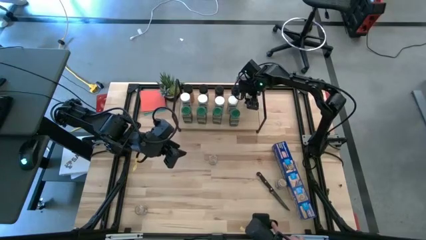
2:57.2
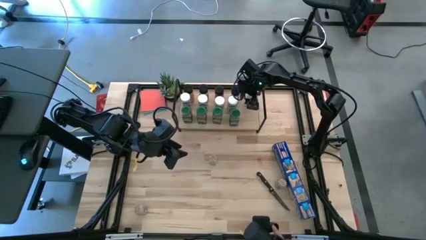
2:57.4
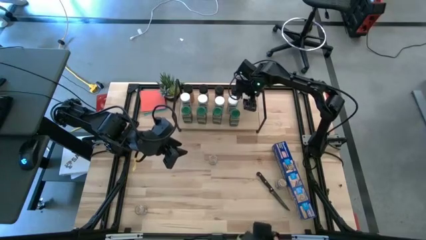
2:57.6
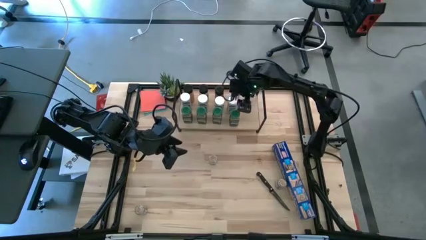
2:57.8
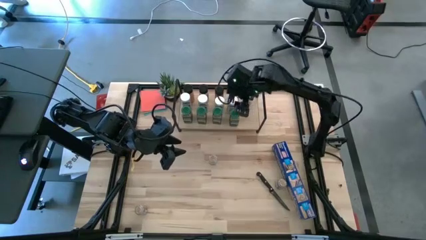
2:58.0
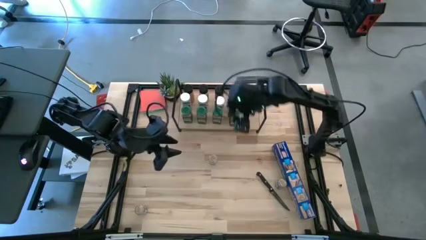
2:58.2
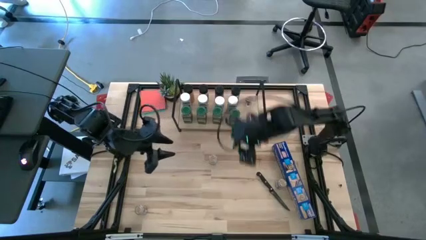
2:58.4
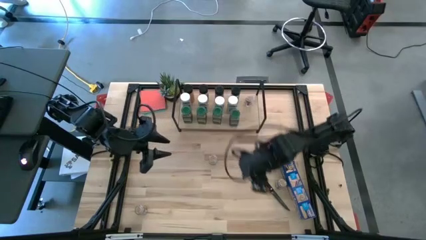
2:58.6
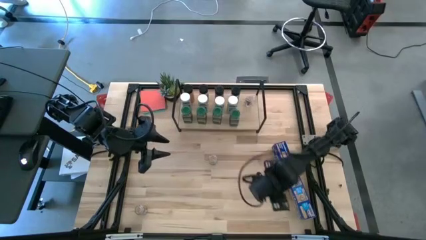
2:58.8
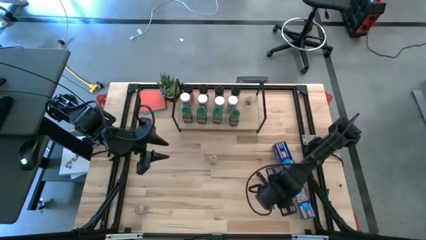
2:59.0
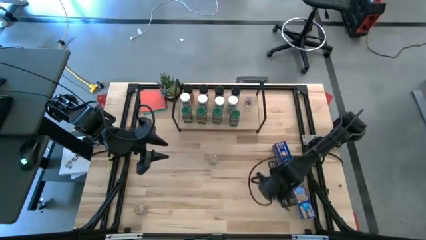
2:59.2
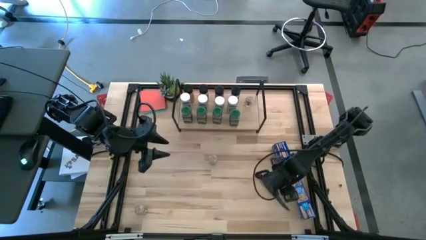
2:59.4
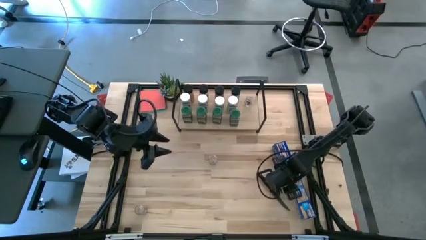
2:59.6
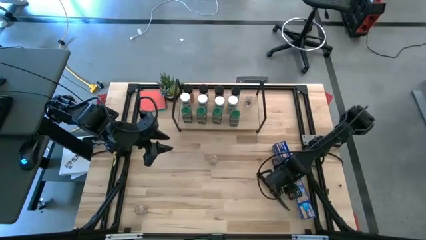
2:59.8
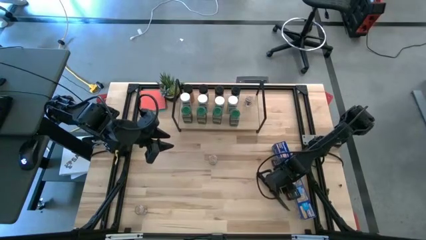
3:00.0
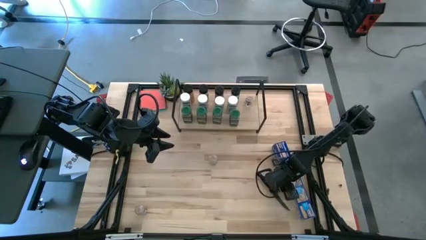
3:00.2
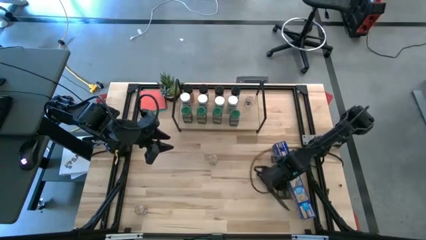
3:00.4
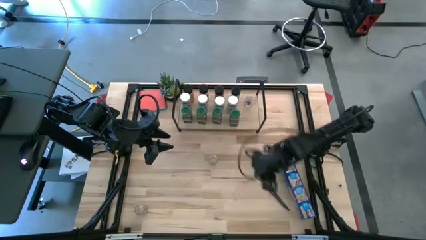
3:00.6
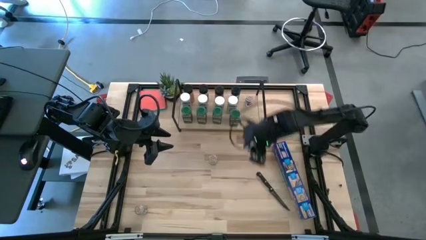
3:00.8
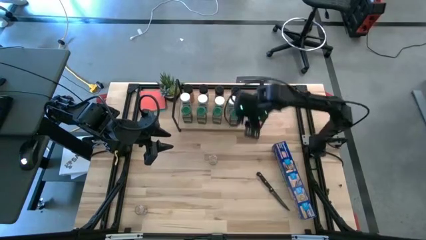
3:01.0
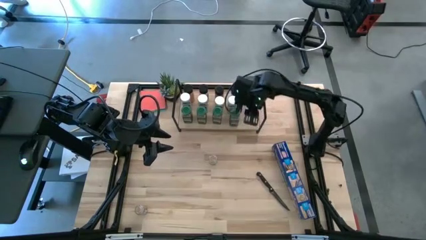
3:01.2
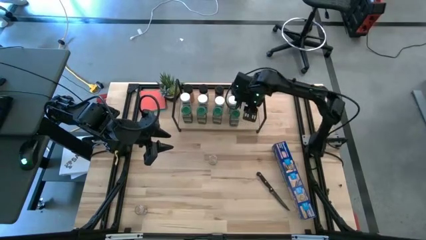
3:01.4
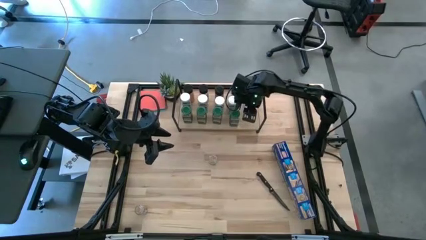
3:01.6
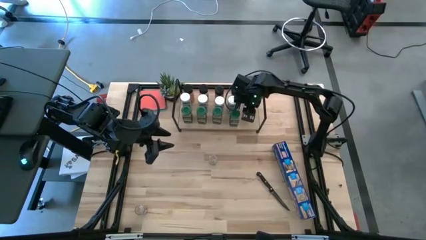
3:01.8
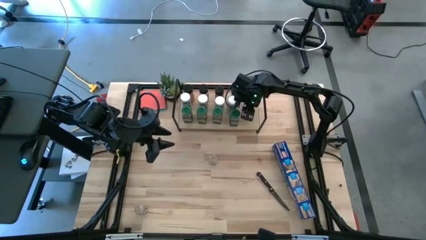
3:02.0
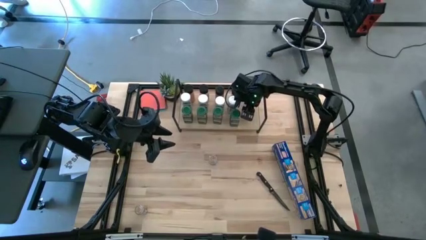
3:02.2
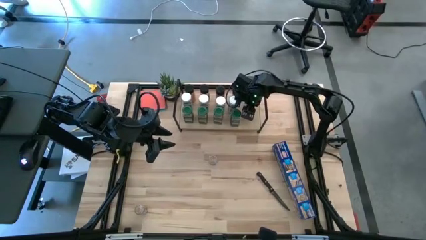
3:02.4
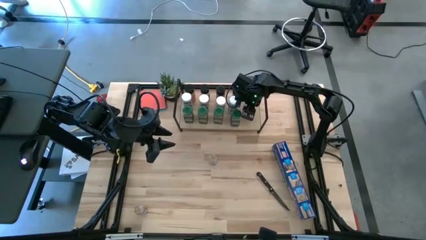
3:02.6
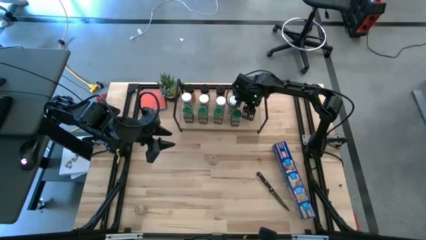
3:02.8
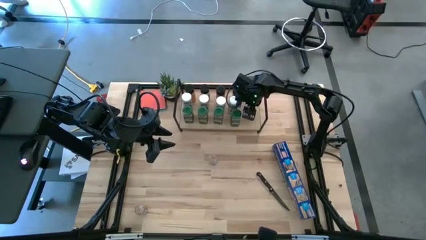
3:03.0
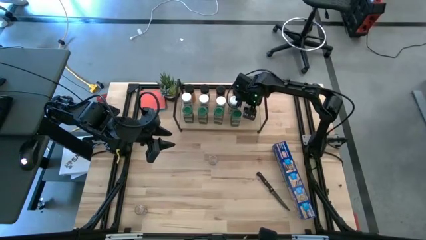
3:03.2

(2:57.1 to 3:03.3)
Task: Shelf spices
Put the transparent seasoning bottle on the shelf aligned with the other transparent seasoning bottle

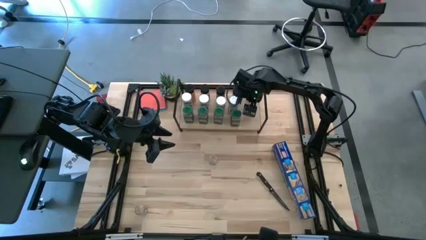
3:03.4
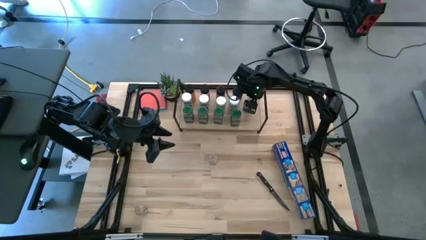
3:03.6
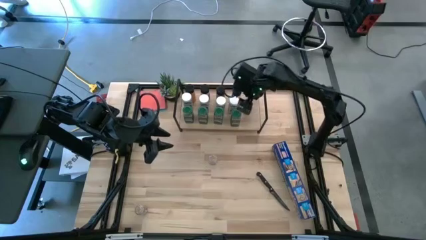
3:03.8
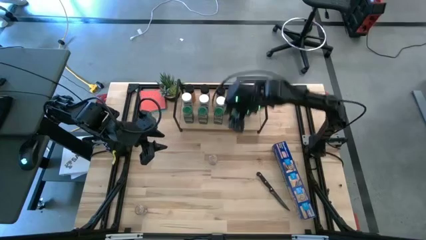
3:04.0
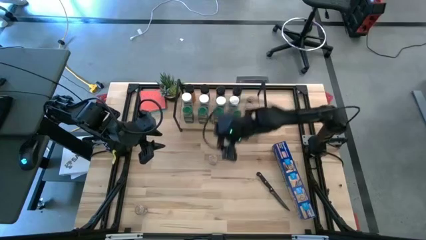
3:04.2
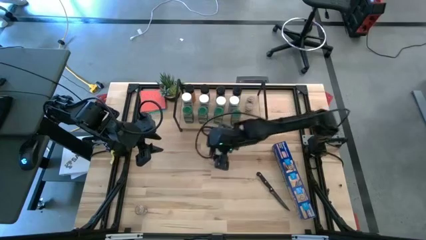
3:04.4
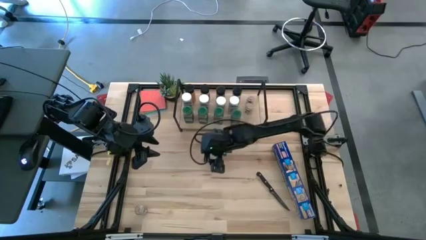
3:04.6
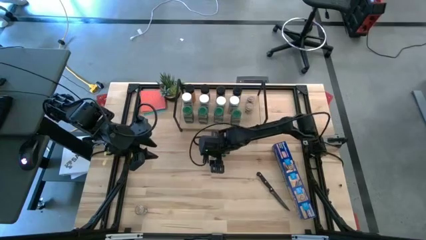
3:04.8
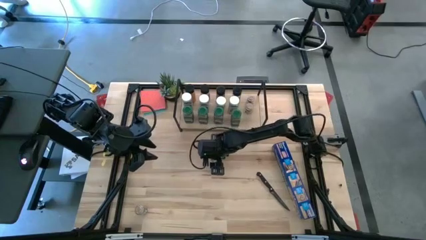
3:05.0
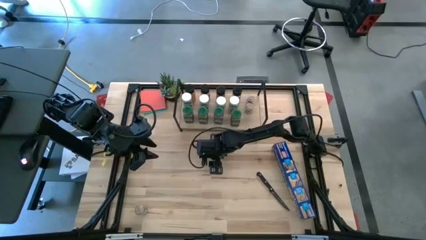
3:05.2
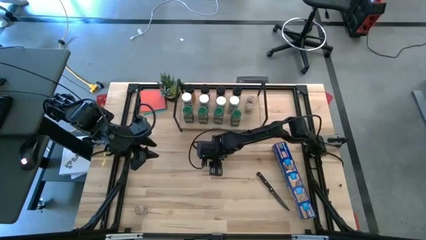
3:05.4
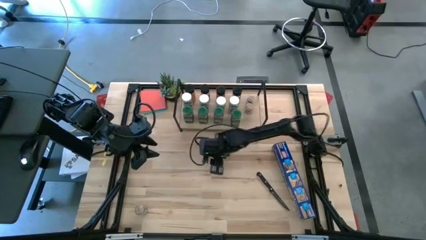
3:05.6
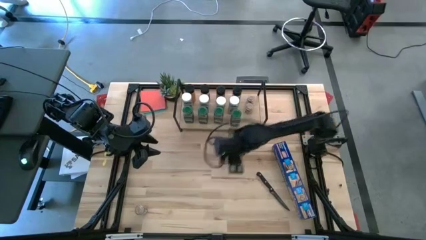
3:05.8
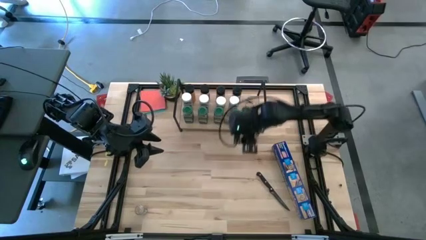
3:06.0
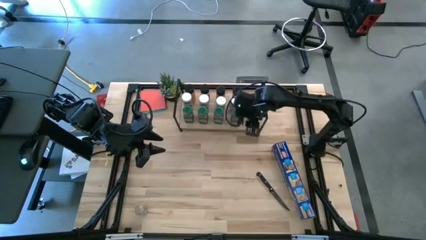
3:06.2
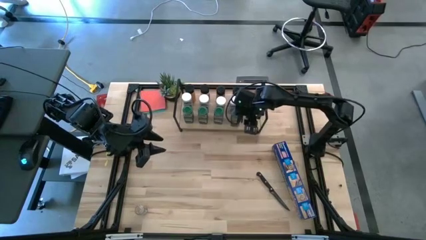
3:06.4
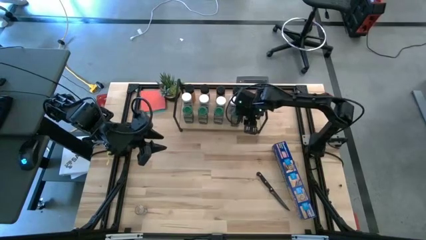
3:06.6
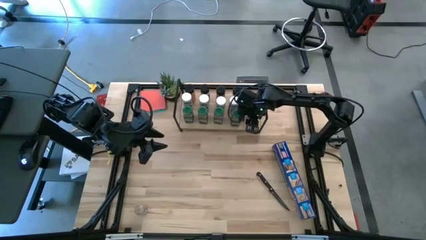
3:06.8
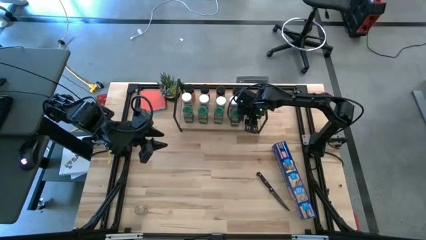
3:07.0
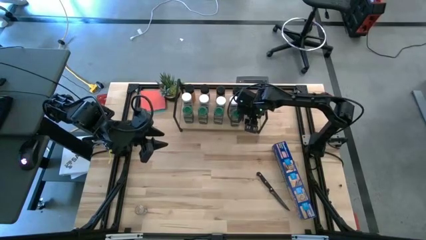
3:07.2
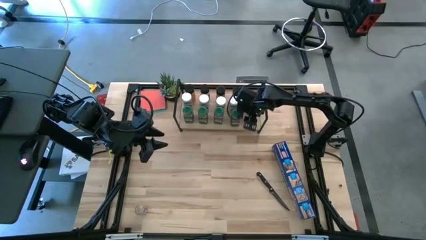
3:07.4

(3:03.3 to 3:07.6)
Put the transparent seasoning bottle on the shelf aligned with the other transparent seasoning bottle

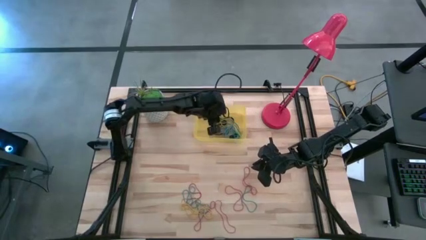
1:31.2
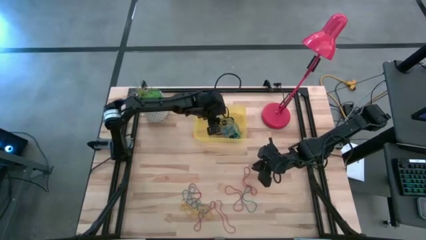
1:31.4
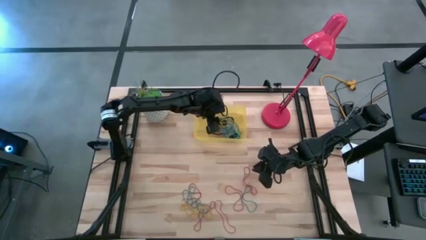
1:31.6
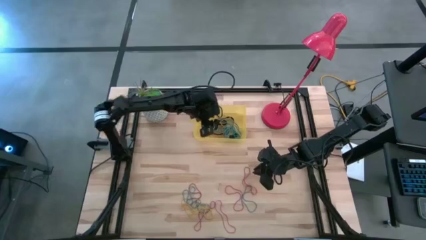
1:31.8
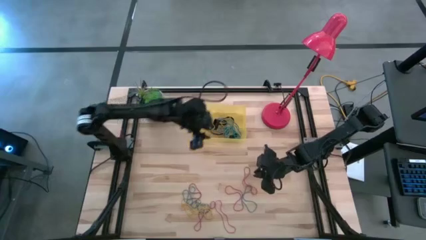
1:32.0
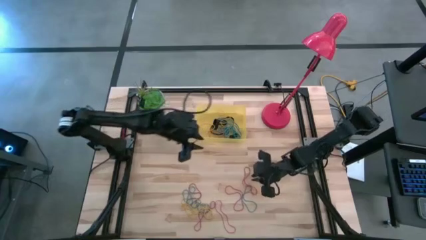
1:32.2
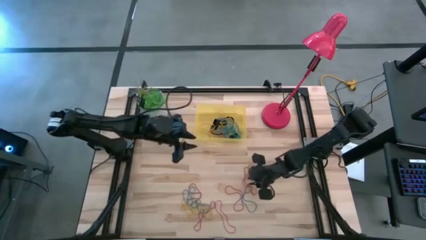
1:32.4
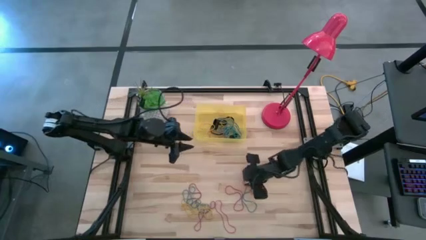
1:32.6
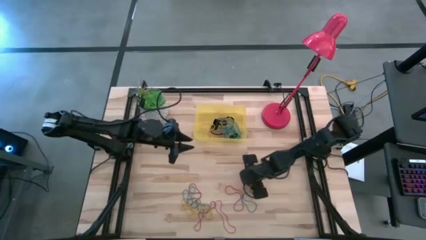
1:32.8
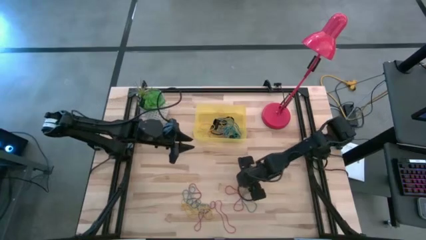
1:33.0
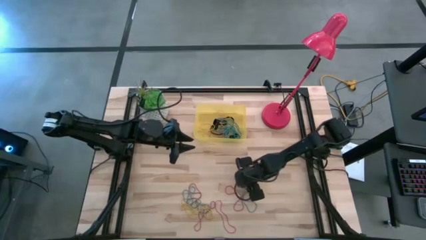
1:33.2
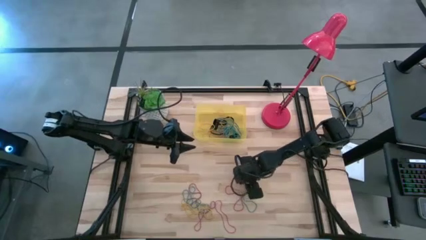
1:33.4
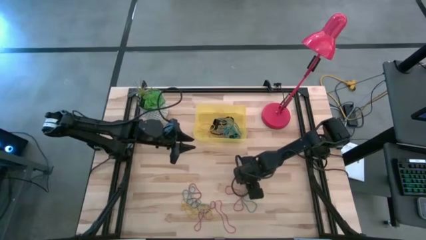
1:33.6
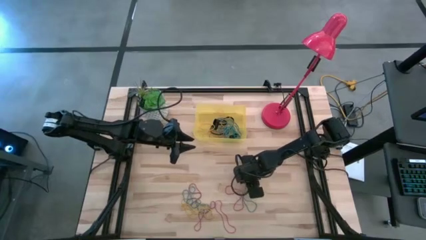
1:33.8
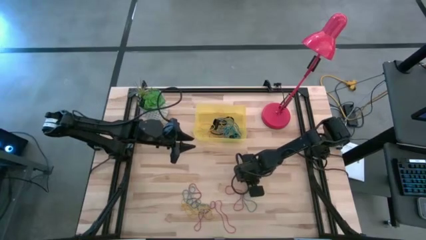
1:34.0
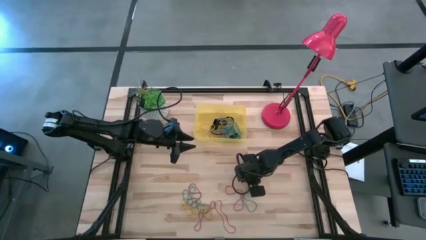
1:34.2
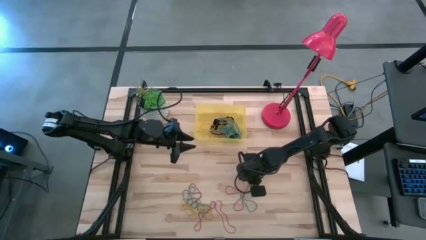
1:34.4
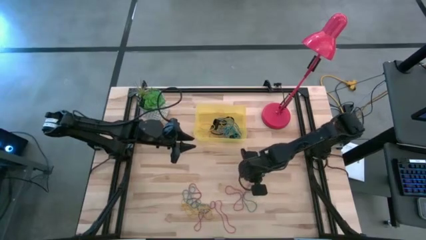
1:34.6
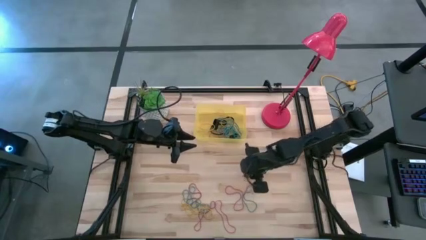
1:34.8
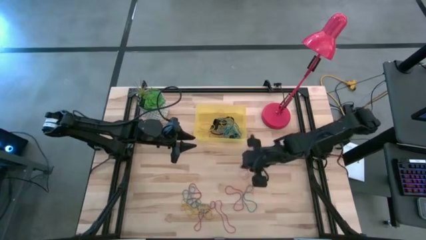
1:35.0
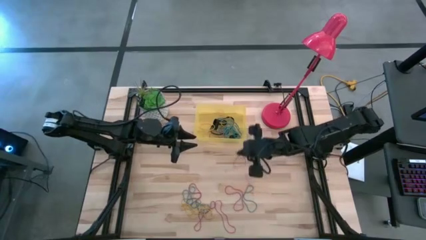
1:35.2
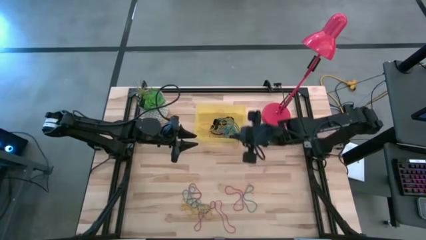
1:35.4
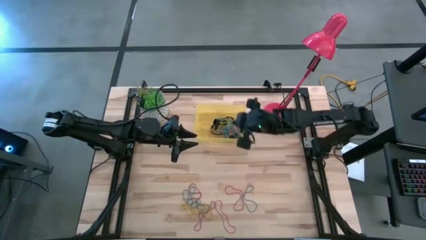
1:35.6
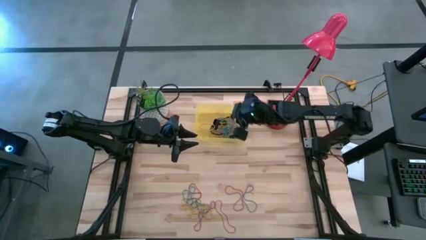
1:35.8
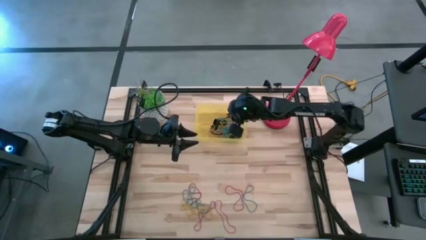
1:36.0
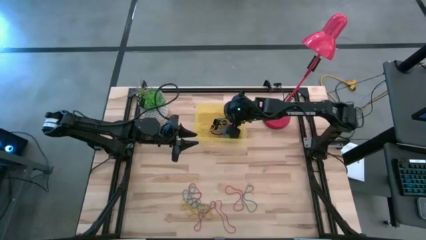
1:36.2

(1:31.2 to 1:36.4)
Task: Pick and place rubber bands into bin
Put the red rubber band into the yellow bin
